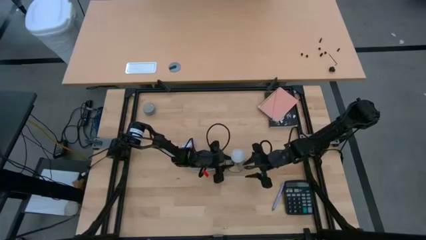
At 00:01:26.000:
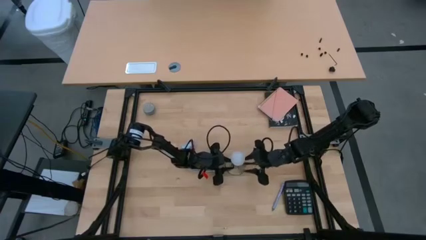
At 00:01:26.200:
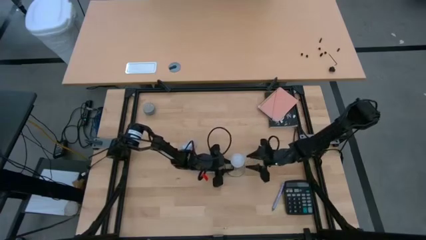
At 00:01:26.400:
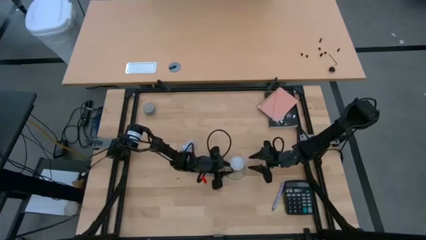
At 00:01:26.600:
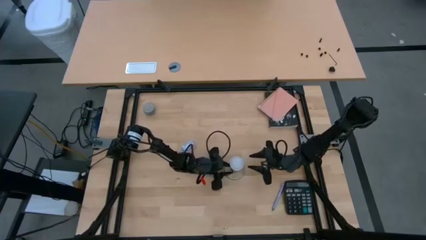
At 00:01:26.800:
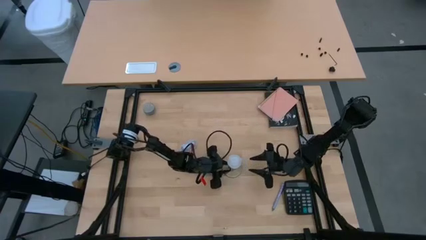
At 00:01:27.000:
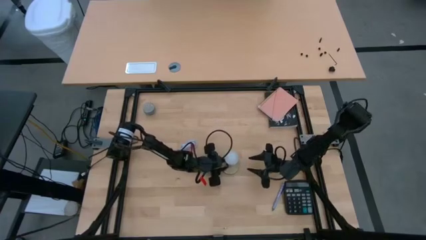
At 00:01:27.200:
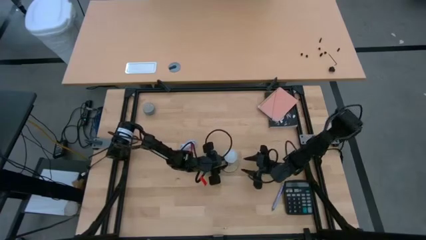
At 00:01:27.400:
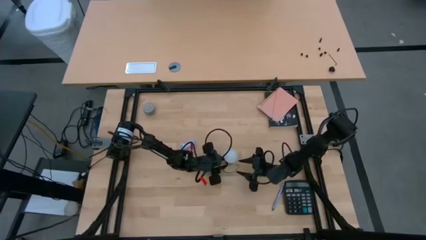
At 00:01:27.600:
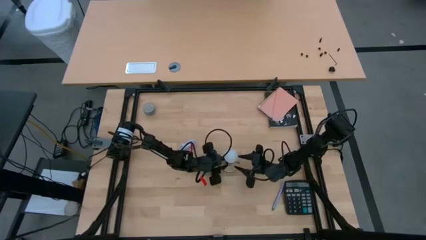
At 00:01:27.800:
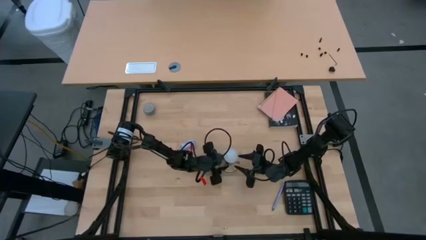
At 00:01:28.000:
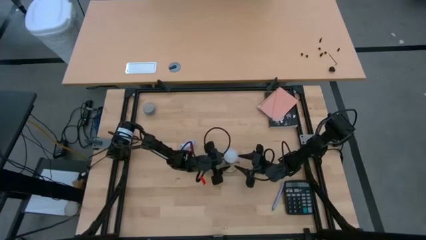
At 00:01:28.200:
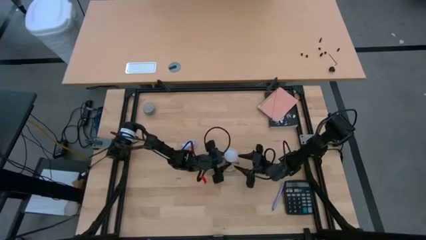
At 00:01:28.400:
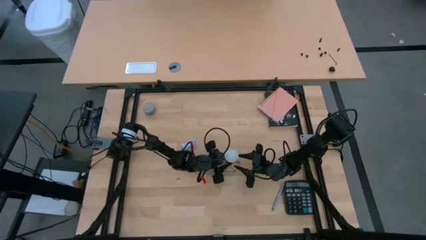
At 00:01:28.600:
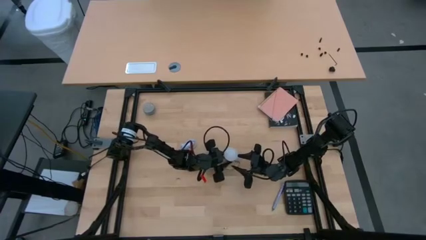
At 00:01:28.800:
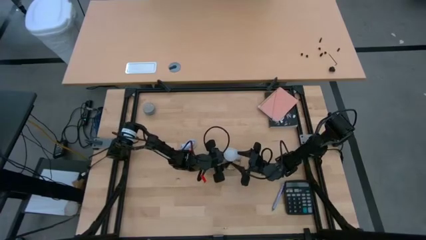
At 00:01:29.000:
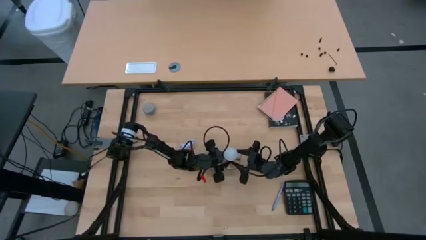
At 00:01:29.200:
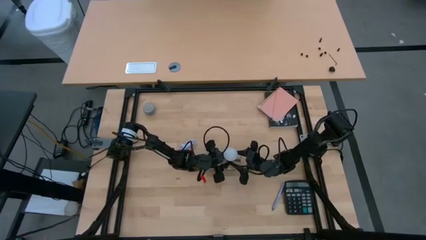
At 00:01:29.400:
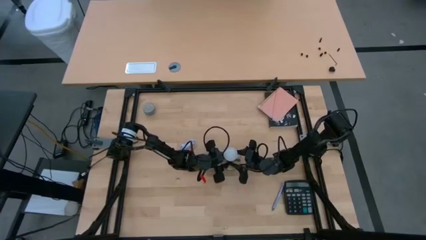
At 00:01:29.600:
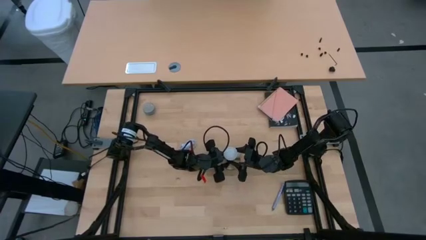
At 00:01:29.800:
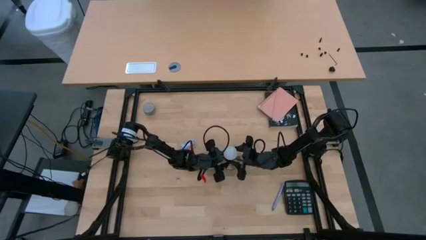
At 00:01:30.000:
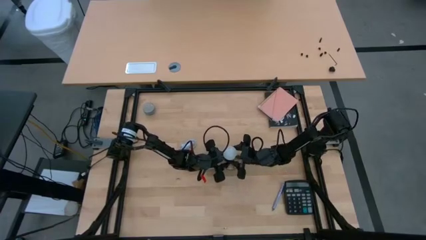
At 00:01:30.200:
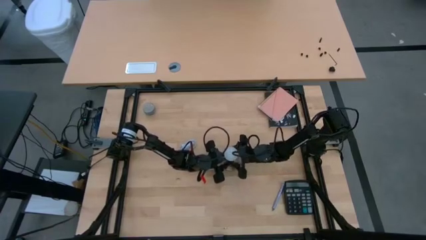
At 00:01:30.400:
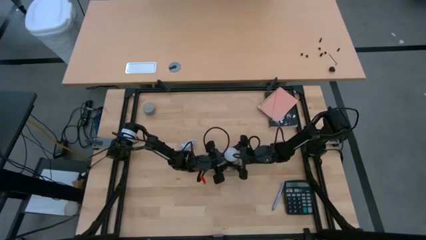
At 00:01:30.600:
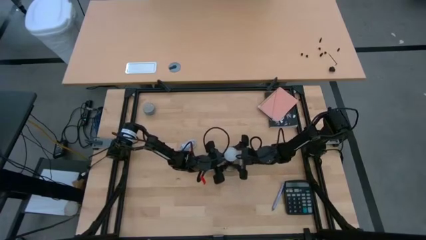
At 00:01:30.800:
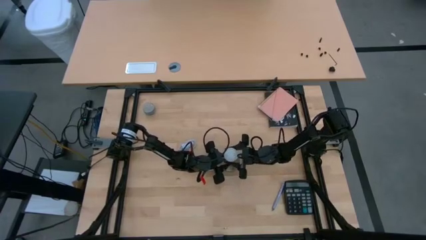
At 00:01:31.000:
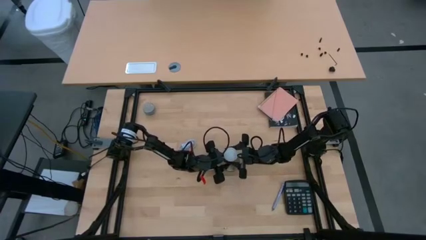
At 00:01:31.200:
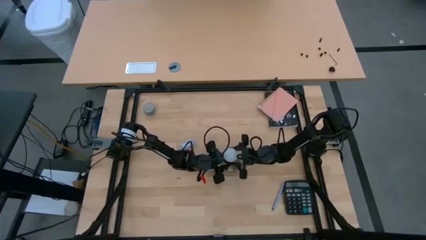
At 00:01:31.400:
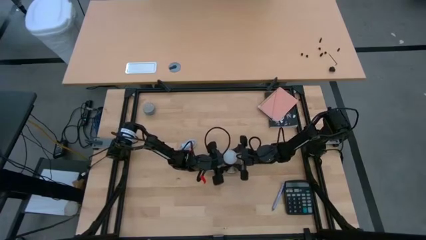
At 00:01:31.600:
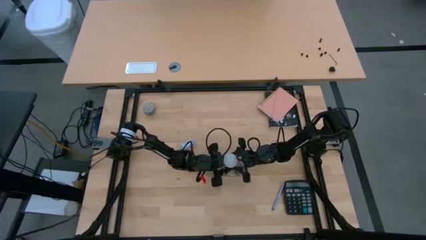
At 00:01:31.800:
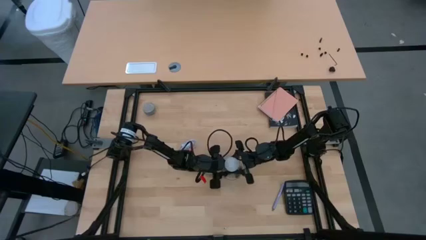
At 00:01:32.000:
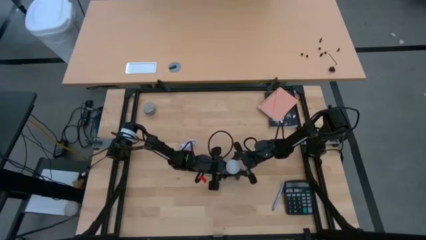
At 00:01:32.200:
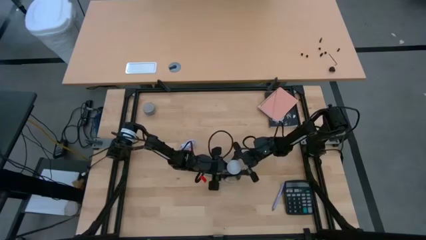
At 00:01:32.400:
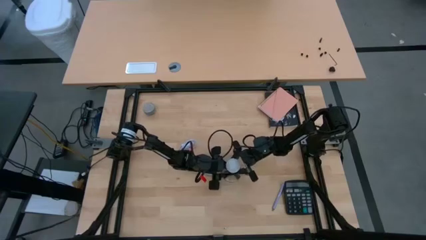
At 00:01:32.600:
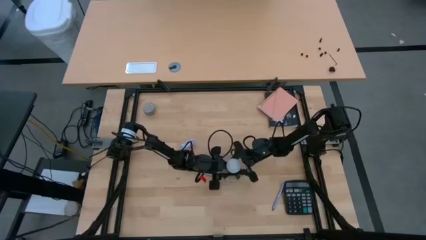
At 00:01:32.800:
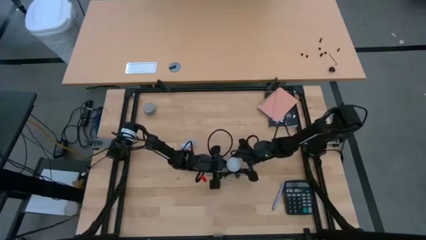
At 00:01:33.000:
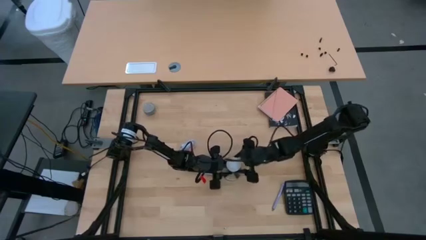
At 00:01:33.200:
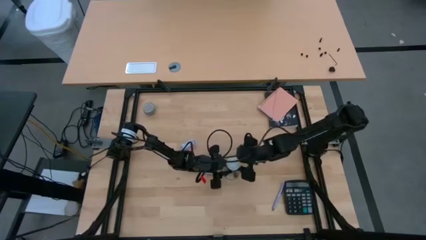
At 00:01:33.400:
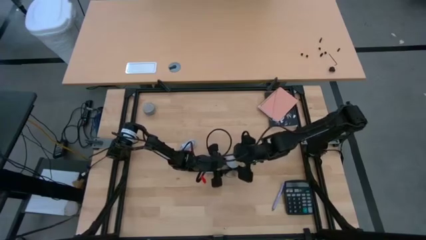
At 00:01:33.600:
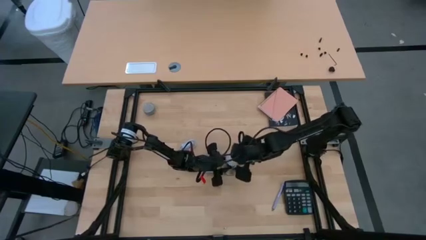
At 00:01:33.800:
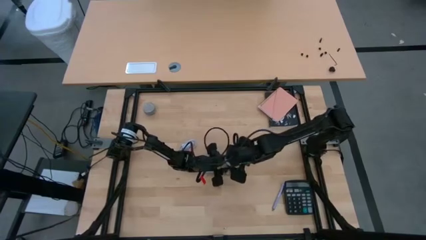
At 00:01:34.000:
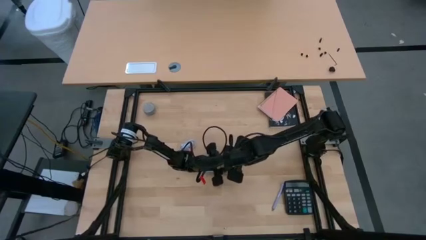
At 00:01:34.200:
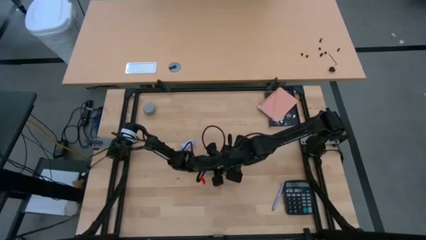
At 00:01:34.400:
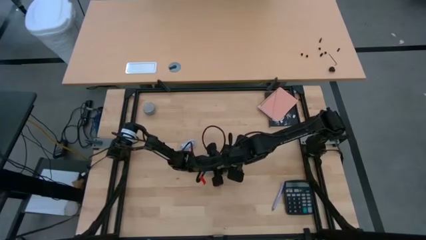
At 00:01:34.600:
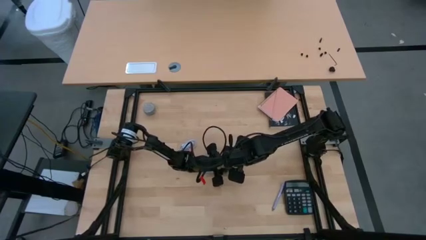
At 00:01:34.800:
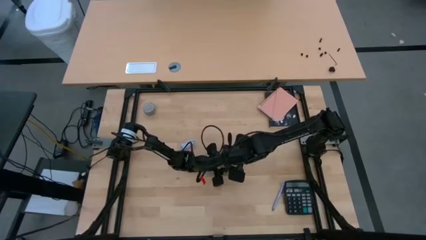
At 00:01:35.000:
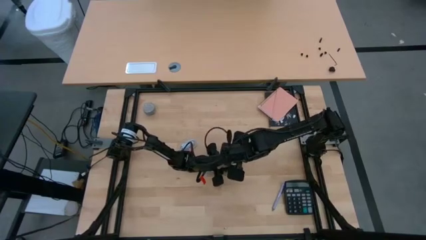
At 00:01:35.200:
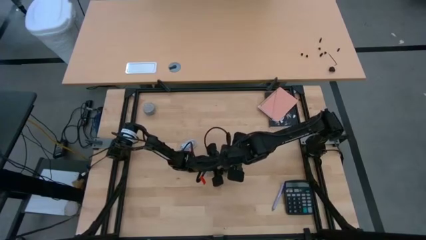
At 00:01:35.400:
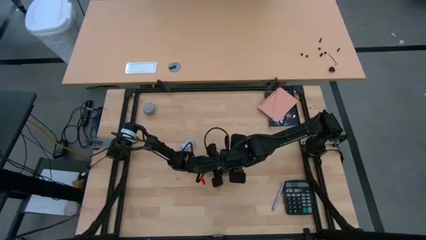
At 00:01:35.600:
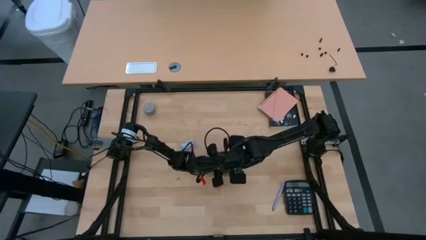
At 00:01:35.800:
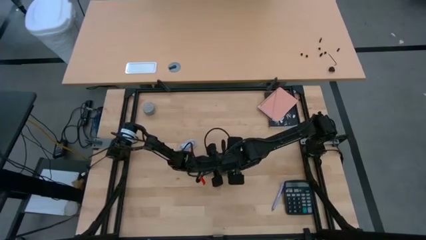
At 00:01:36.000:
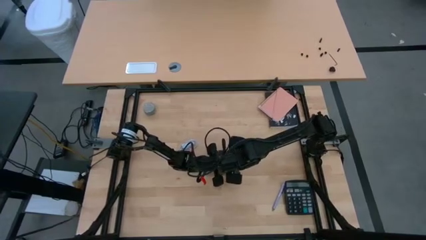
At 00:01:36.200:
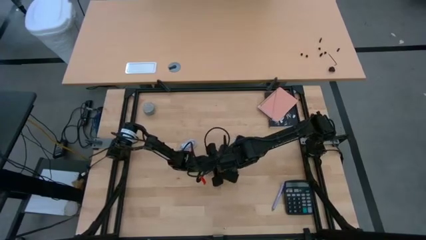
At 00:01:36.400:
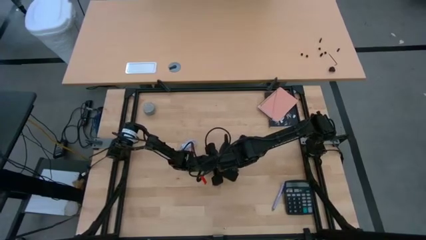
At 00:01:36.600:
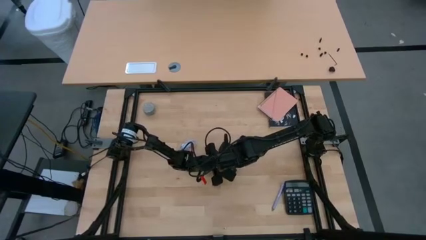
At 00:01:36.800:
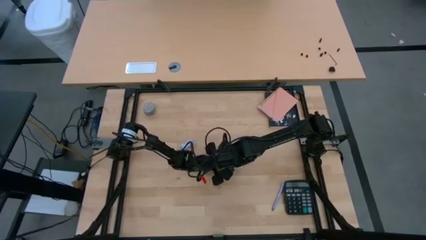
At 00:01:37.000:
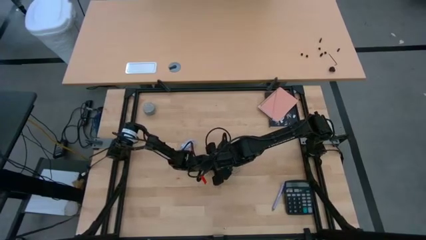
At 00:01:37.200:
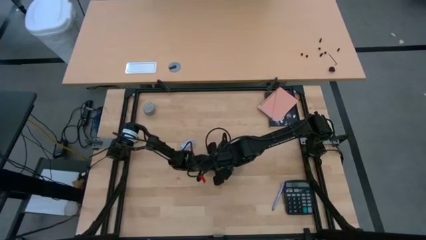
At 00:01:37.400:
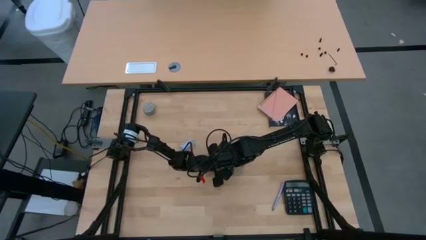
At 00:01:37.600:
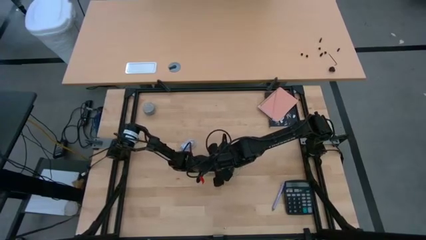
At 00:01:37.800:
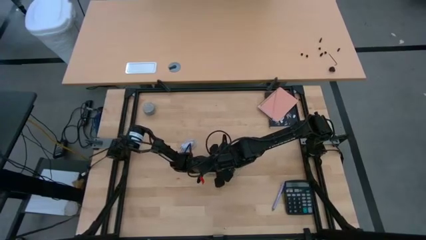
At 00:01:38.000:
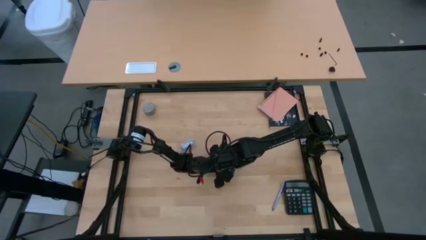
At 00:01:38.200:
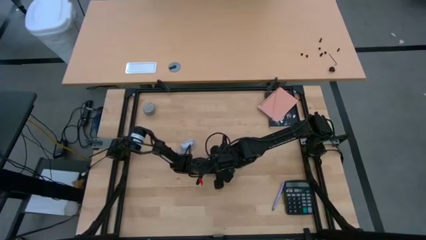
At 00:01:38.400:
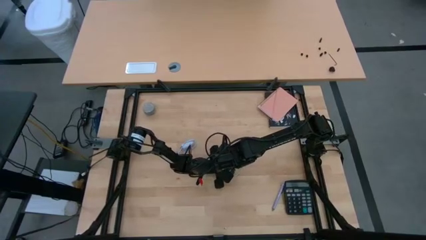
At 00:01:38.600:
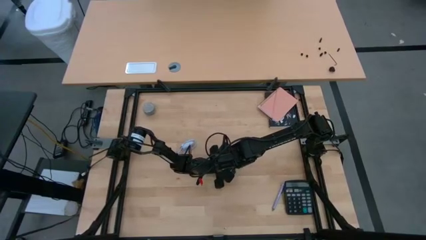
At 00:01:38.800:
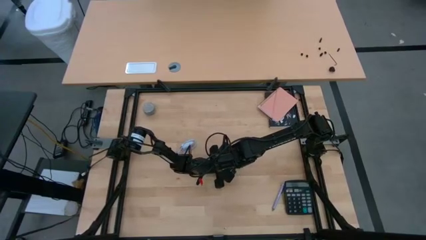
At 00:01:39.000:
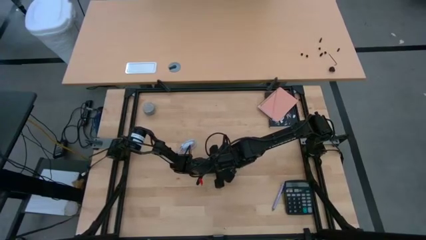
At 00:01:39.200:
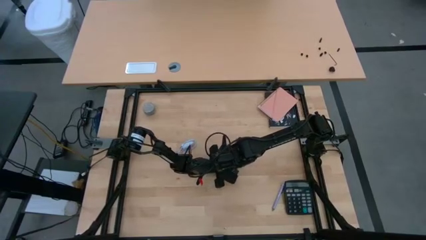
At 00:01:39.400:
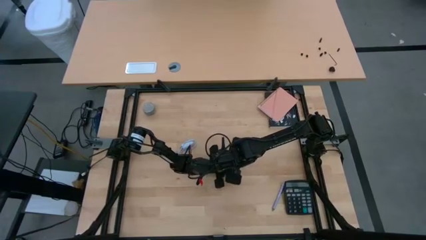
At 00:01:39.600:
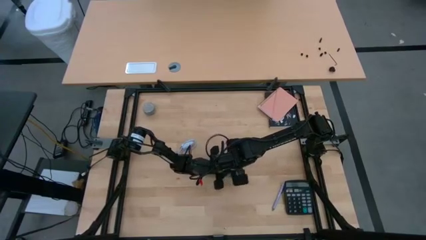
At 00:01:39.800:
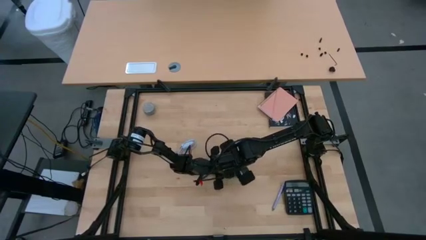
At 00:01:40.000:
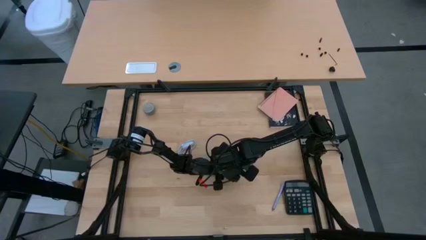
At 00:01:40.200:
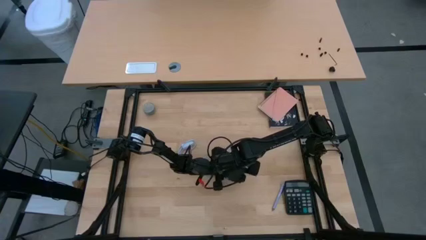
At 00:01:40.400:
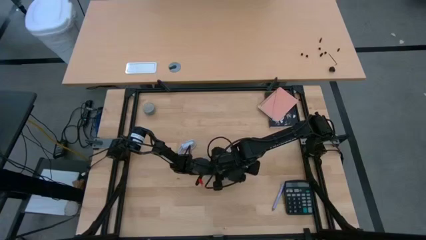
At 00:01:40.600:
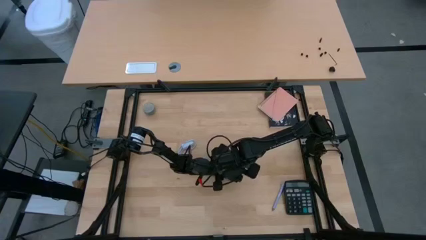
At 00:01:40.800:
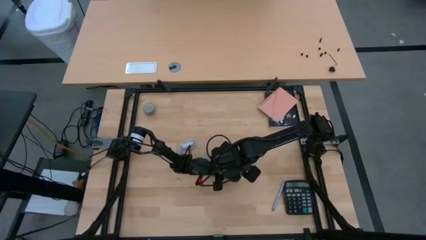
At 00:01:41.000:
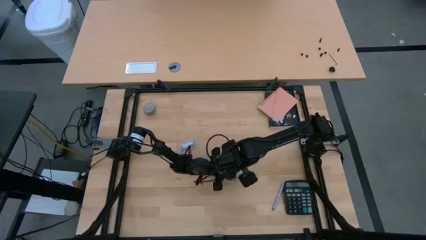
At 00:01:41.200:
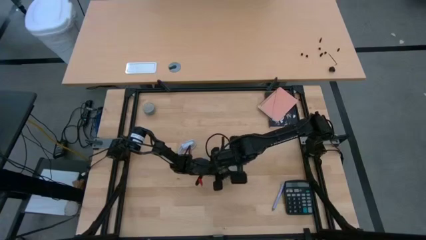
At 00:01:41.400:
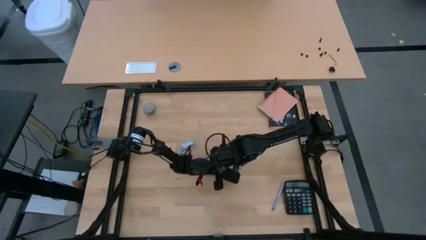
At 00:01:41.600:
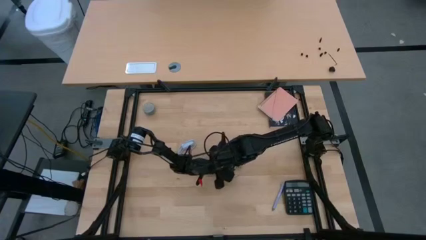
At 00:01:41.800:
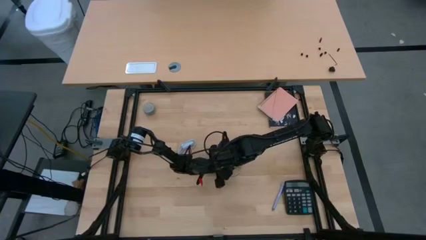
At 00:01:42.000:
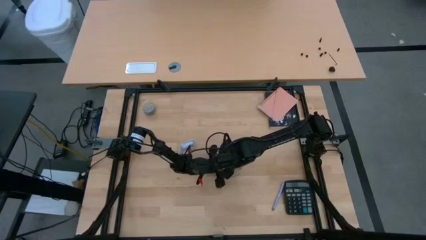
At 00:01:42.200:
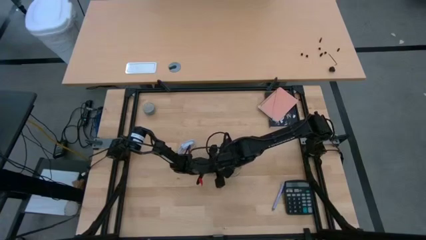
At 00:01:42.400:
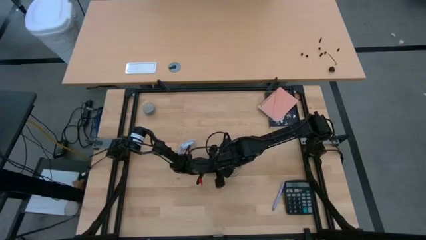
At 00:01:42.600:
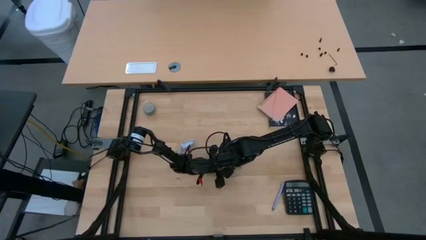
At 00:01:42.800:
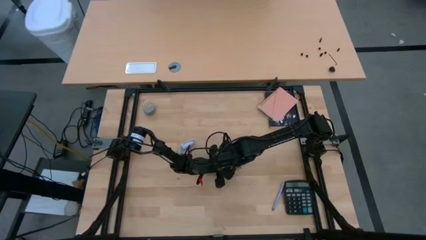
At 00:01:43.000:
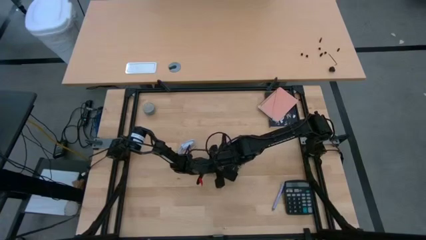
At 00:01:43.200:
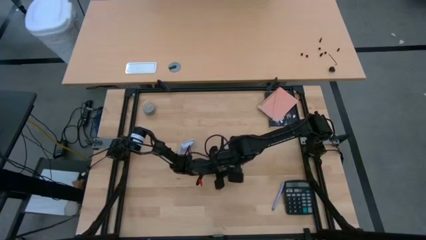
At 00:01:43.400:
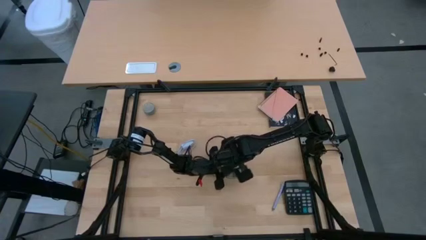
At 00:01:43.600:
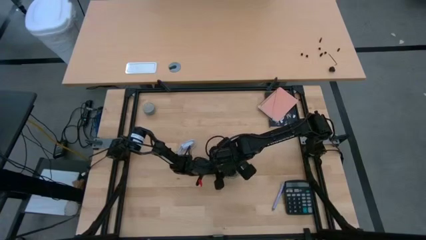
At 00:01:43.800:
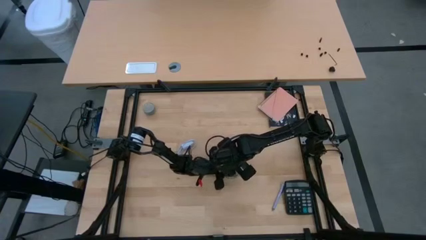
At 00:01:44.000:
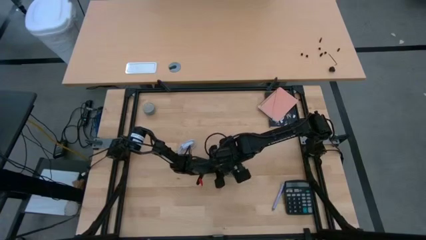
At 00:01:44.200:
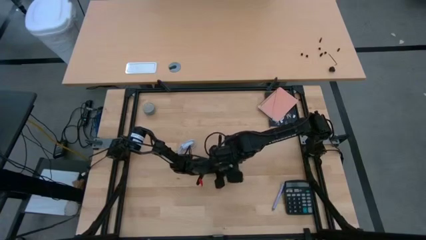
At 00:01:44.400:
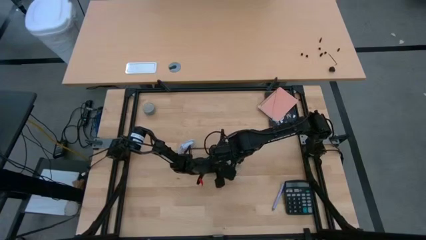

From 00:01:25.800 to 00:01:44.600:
Task: Screw lightbulb
Remove the white lightbulb from the gold lamp
